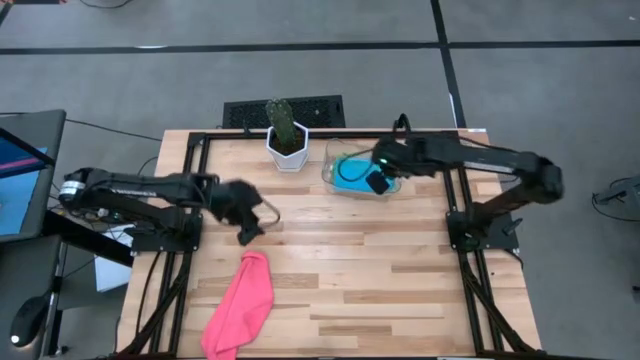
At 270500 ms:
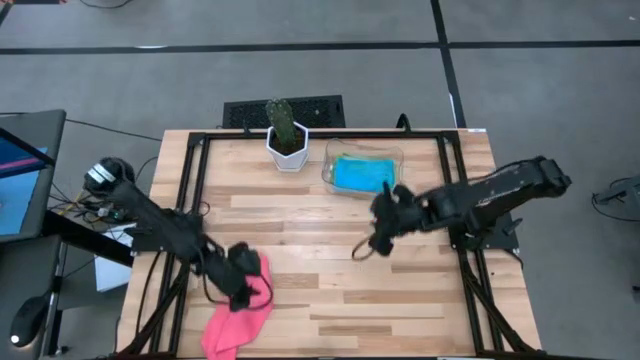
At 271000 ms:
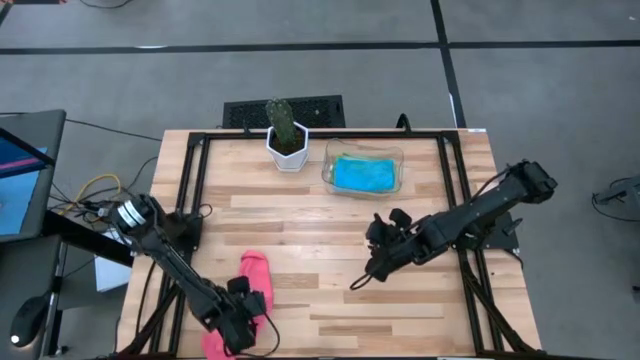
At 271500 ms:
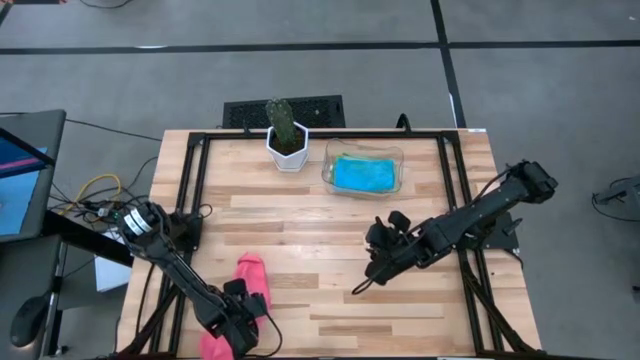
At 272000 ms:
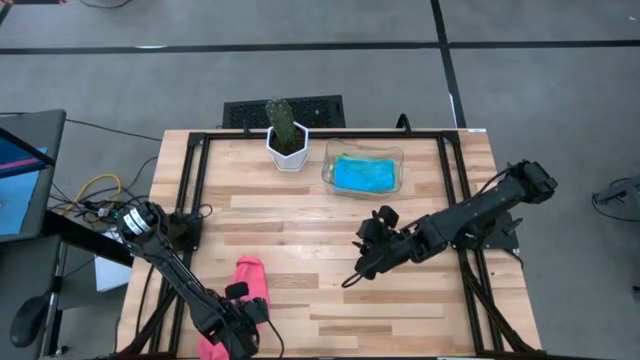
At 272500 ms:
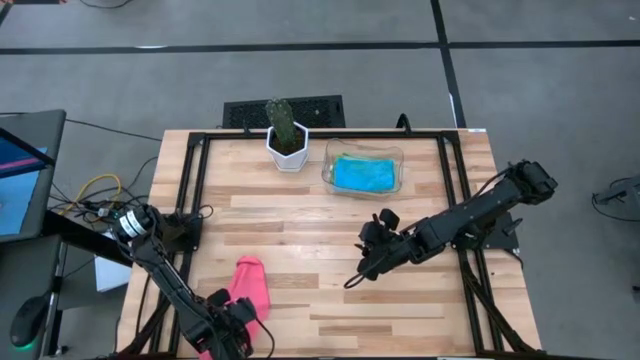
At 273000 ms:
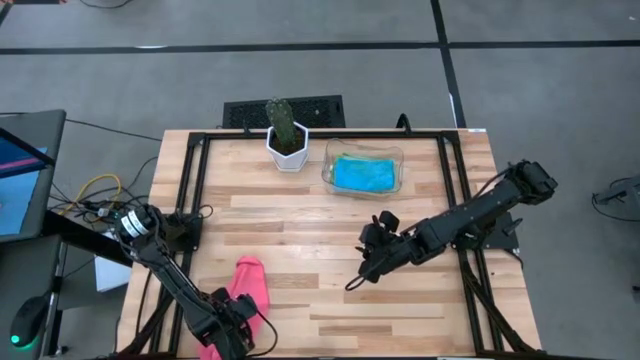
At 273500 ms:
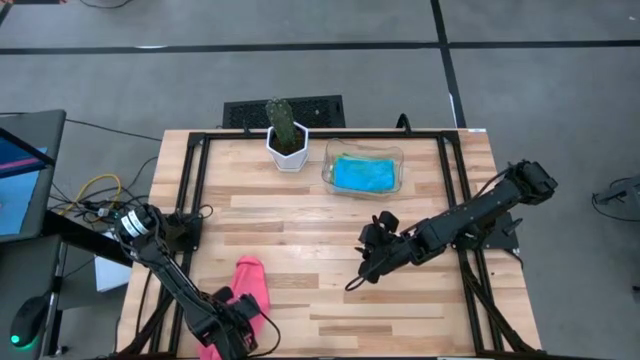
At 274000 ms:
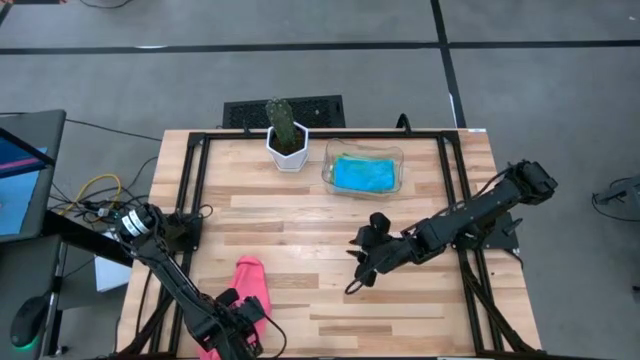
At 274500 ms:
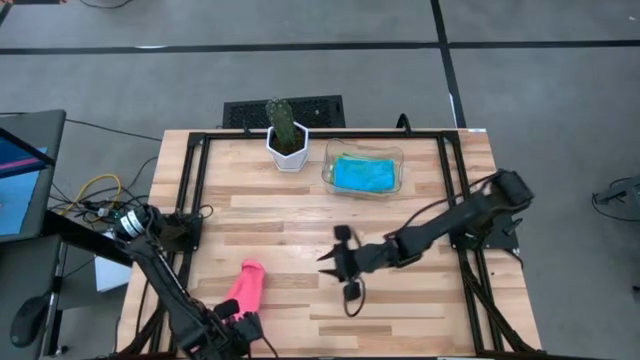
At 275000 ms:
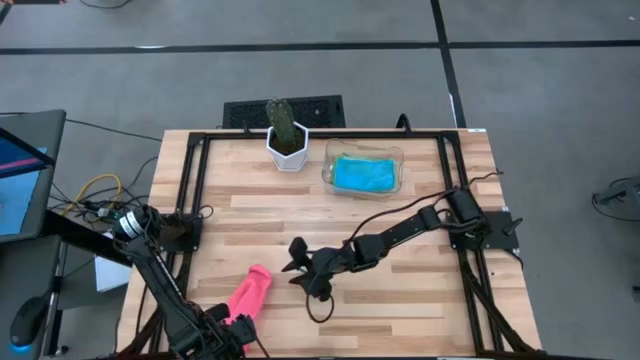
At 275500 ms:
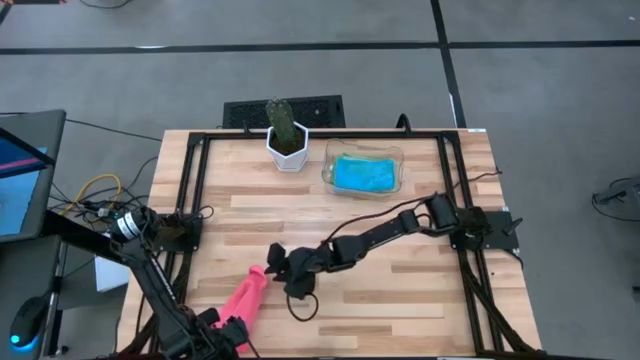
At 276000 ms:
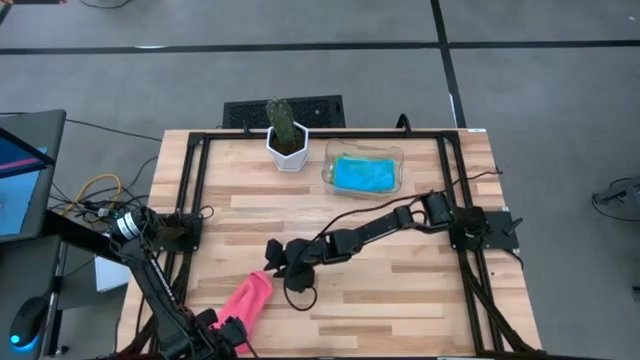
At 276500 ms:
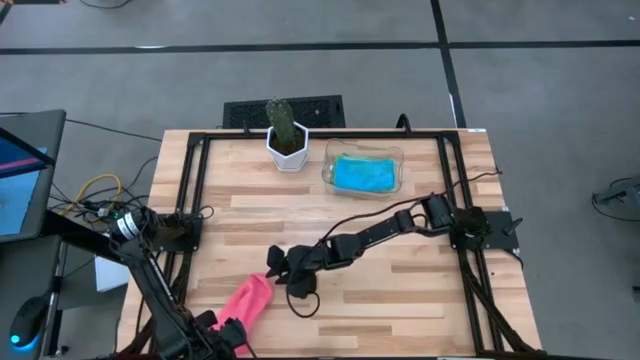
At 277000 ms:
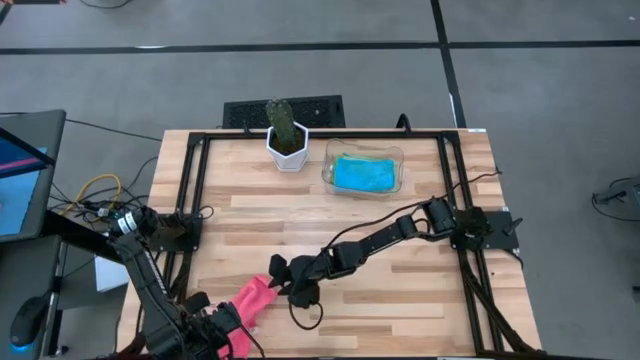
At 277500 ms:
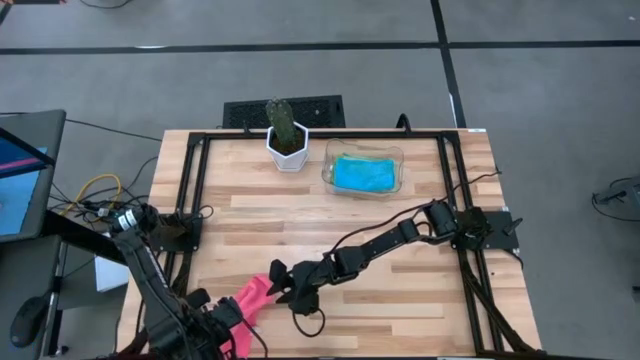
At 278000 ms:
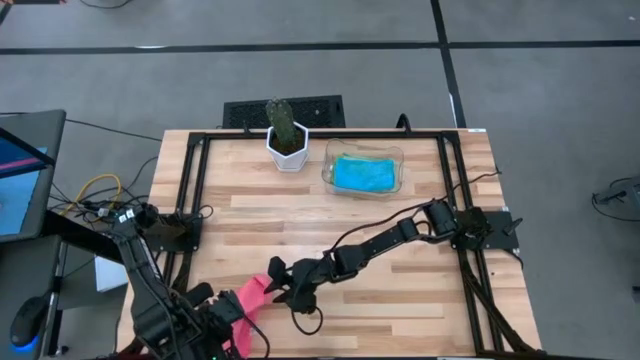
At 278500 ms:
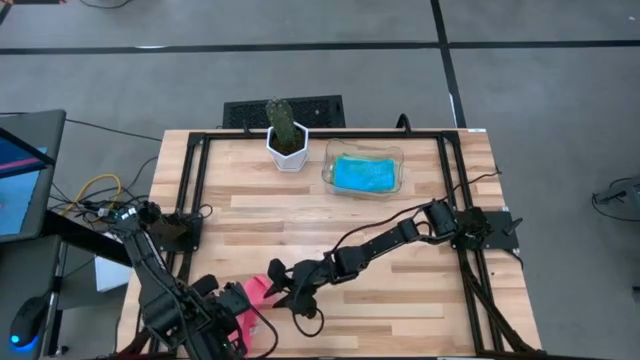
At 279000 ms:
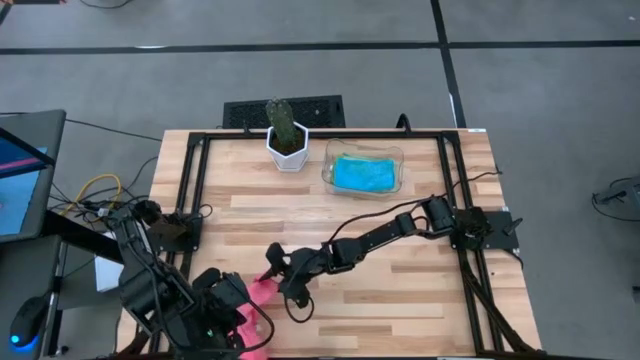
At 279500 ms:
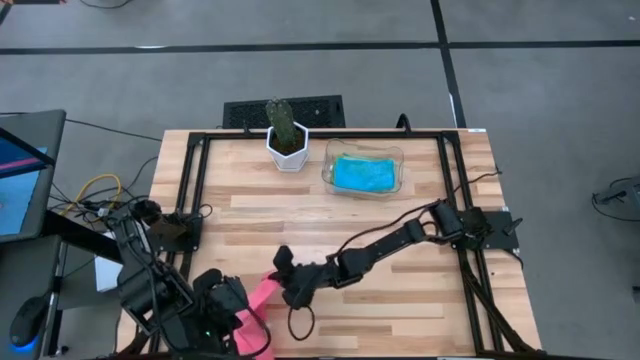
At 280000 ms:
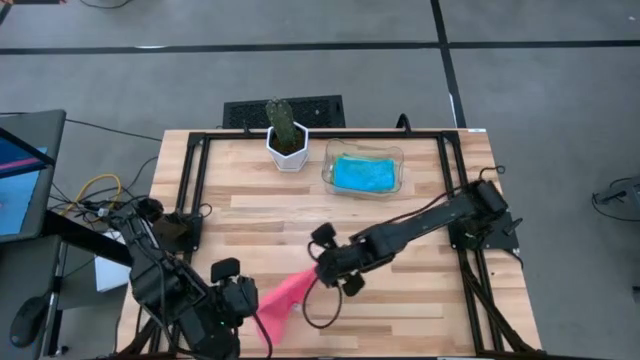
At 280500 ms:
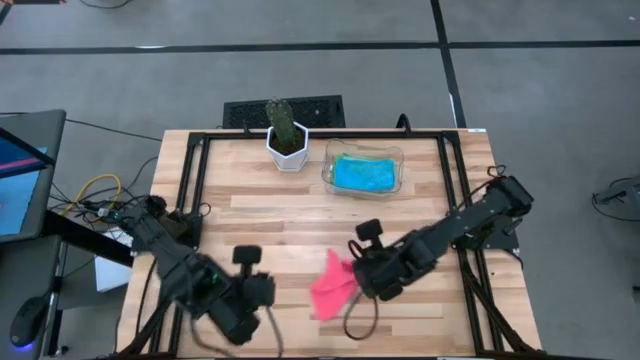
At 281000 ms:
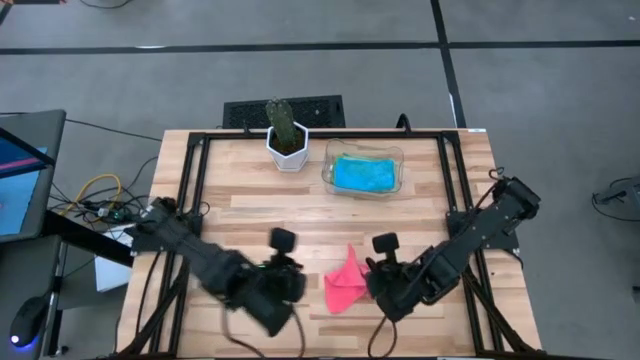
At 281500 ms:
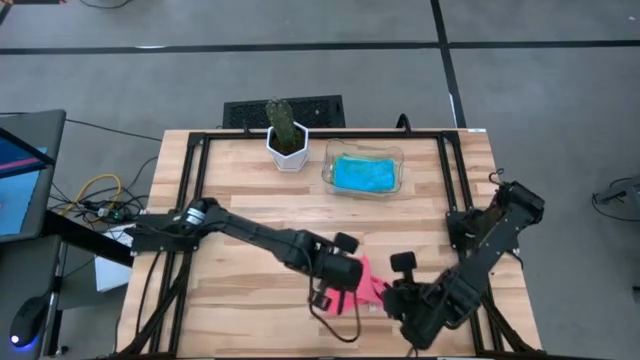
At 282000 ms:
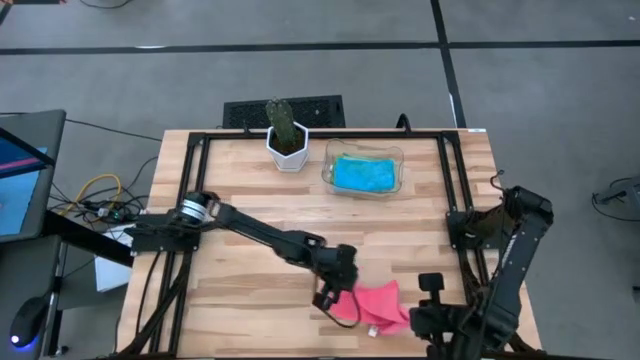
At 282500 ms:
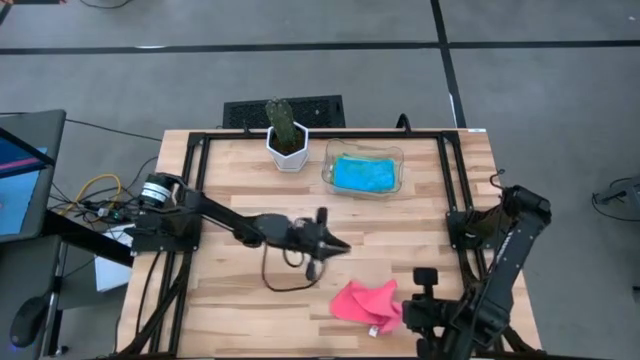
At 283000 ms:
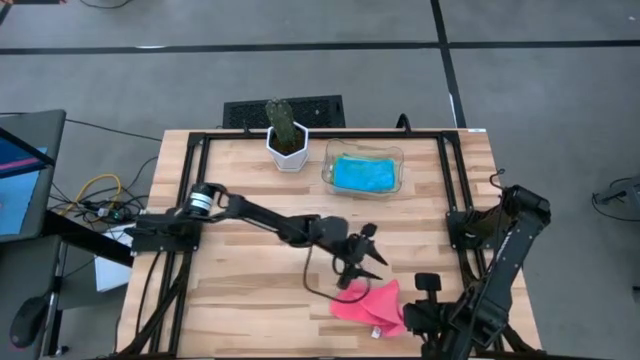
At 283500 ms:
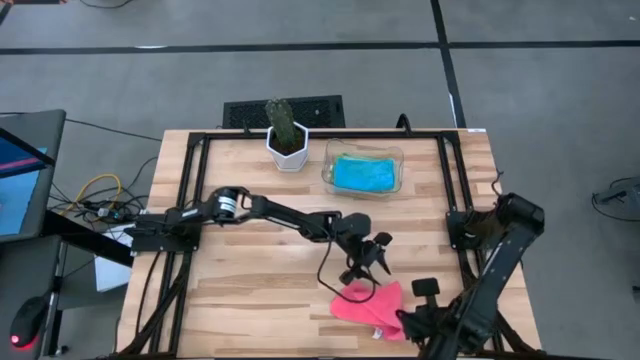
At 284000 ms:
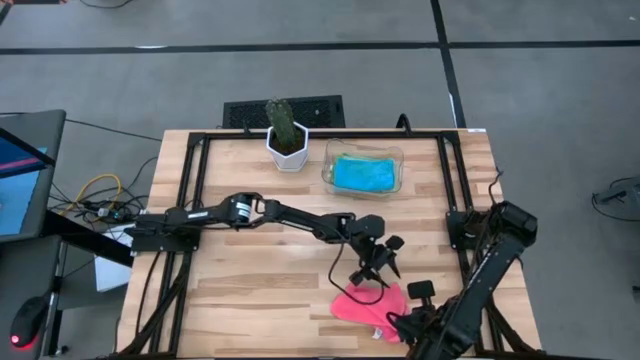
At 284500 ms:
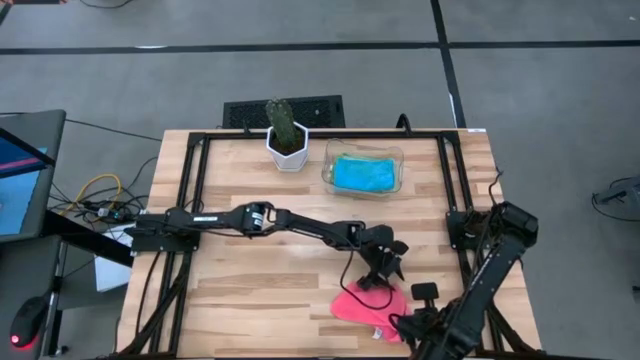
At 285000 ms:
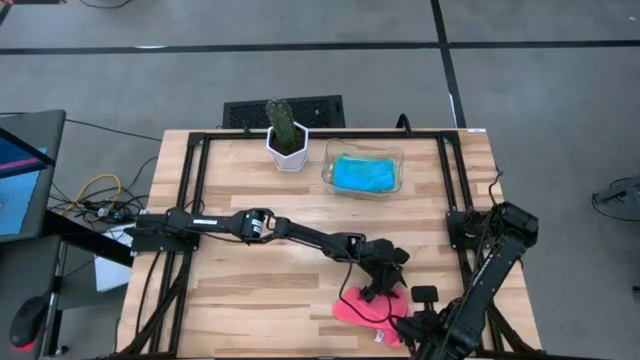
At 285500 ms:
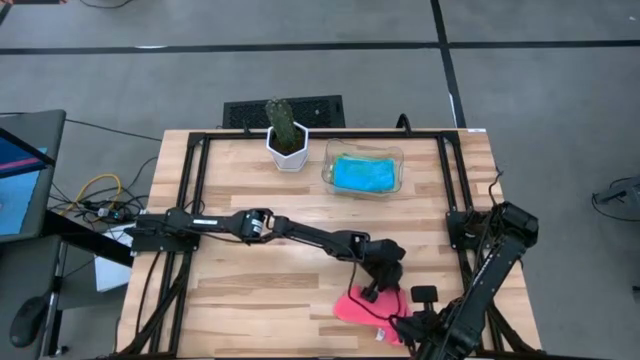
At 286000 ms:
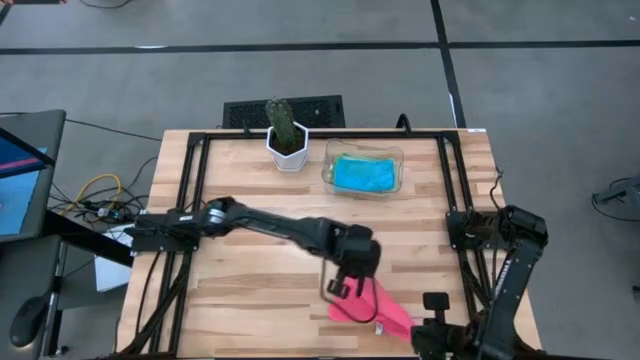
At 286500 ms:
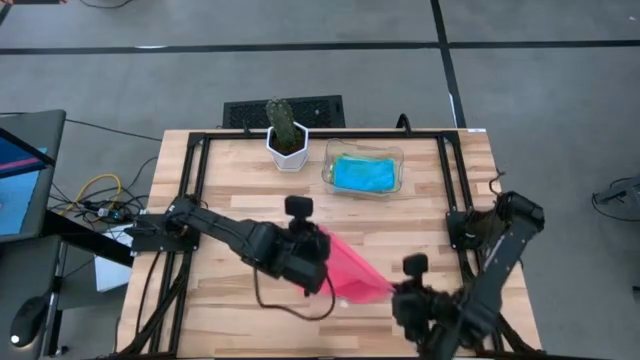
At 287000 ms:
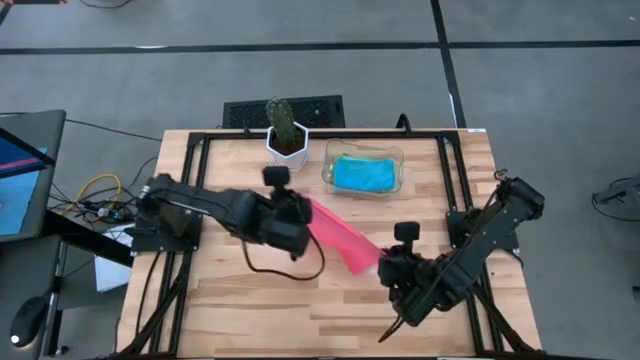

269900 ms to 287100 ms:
Task: Fold microfiber towels
Fold the pink towel

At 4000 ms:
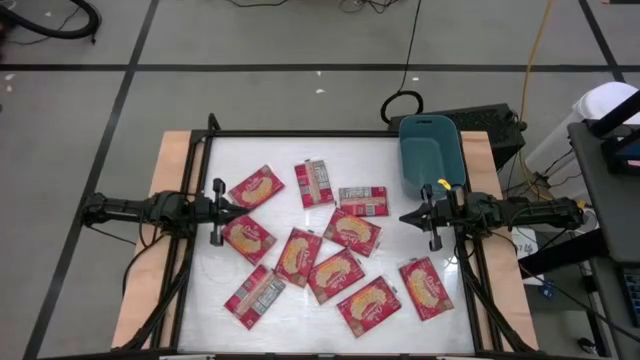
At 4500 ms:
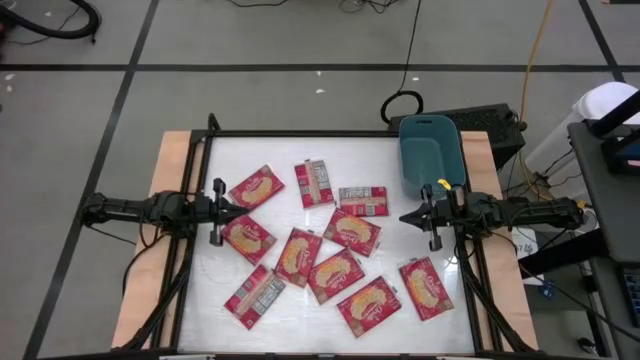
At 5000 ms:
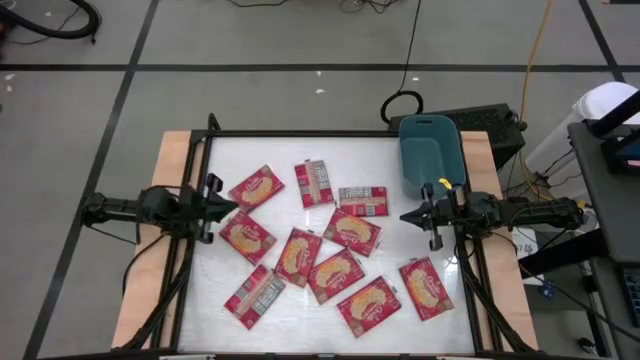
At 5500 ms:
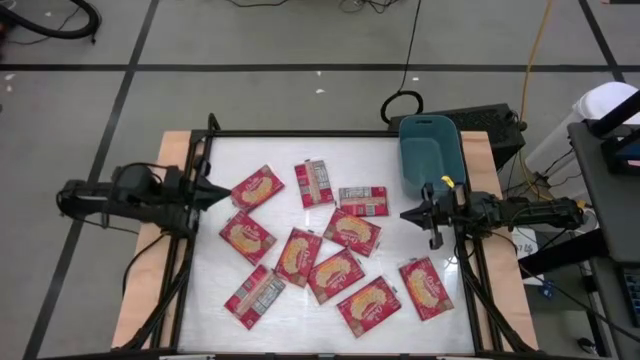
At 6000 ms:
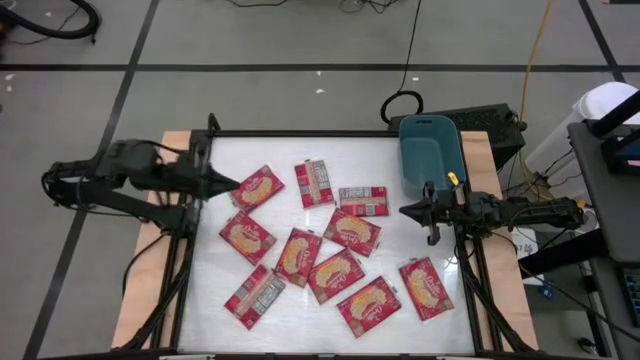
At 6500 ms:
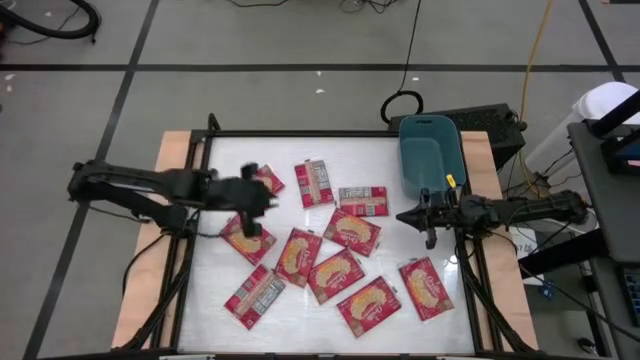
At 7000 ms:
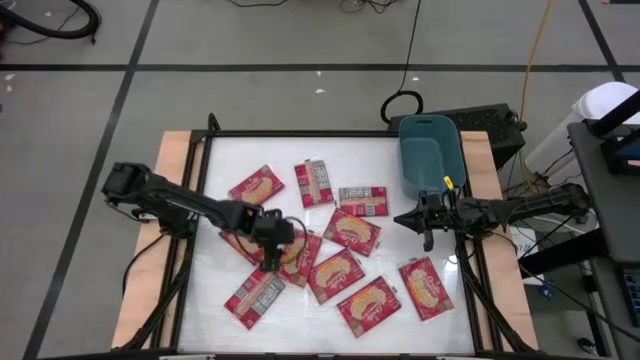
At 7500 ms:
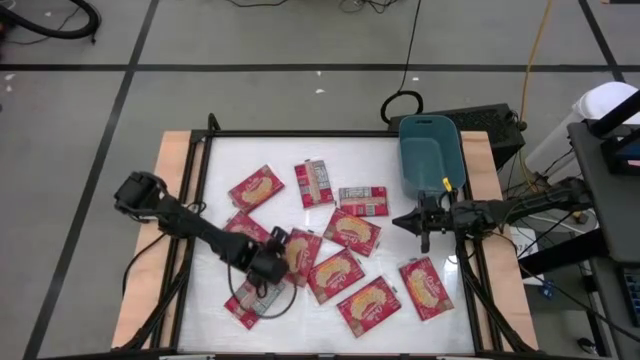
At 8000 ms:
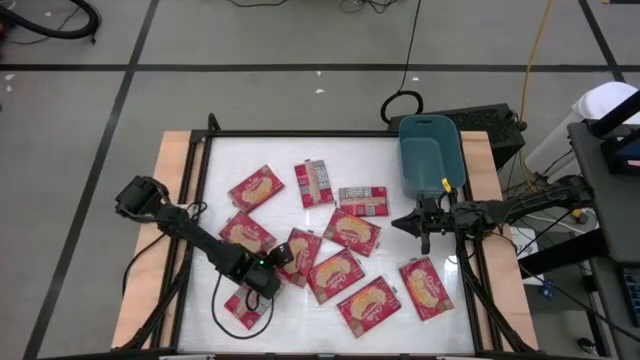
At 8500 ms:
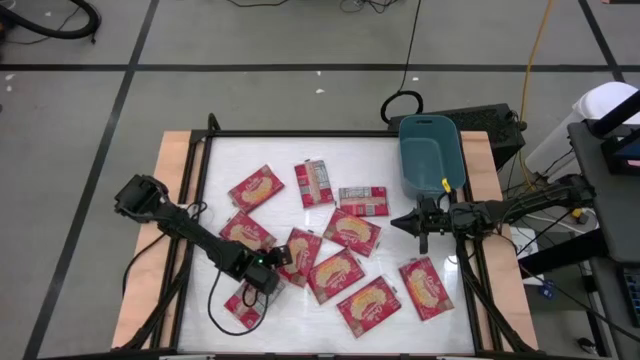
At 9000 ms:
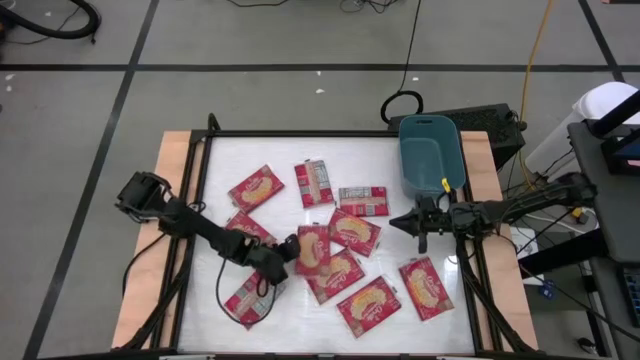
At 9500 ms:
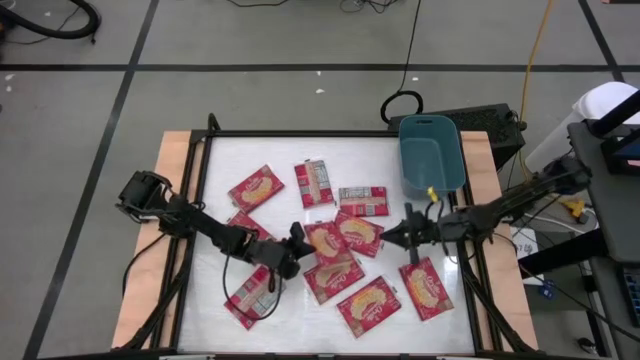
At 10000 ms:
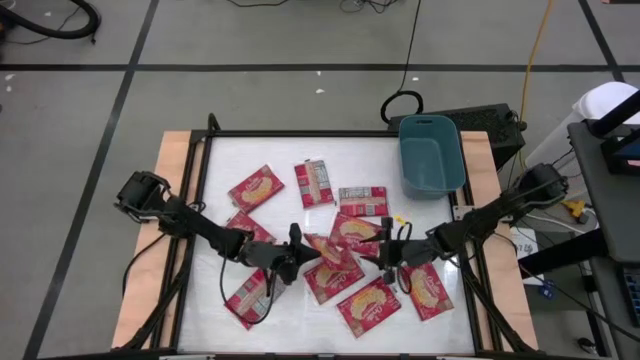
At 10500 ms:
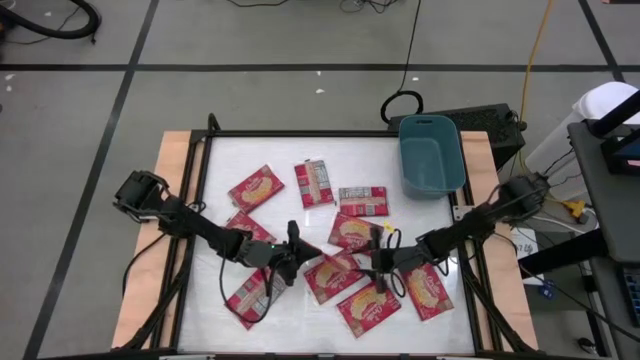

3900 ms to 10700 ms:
Task: Sort popcorn bags into baskets
Put the red popcorn bag into the blue bin
